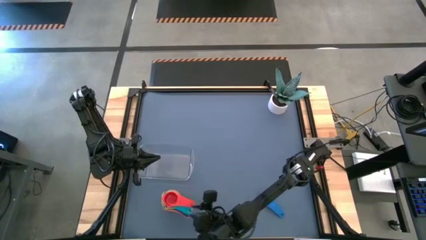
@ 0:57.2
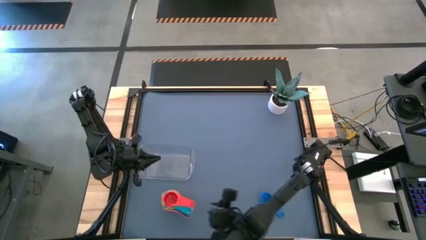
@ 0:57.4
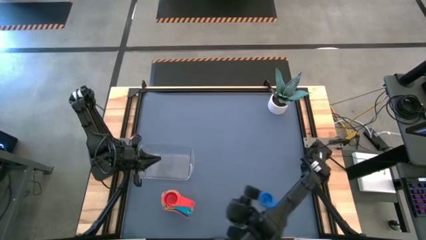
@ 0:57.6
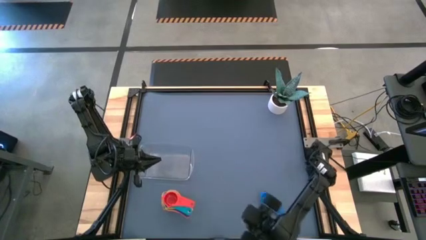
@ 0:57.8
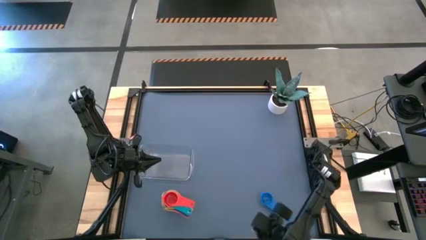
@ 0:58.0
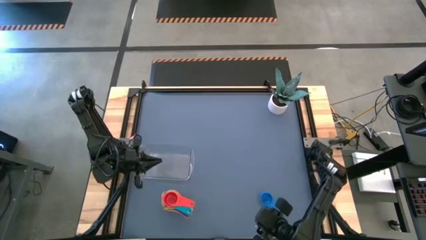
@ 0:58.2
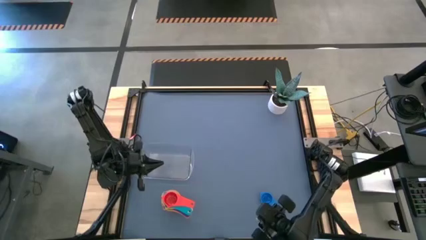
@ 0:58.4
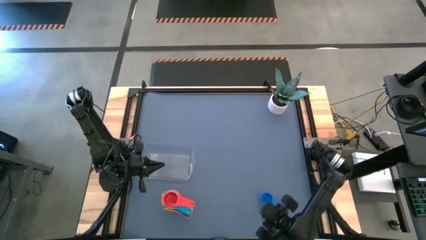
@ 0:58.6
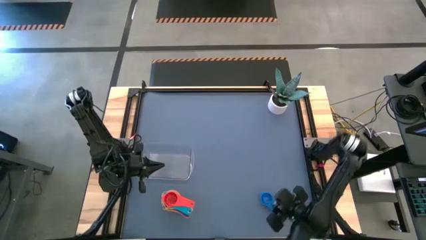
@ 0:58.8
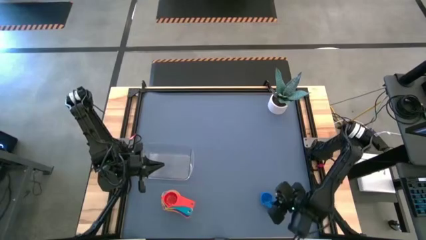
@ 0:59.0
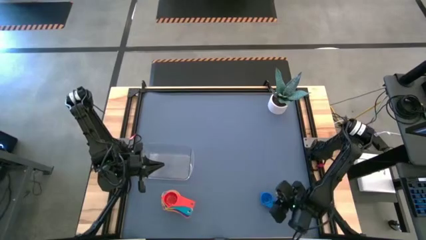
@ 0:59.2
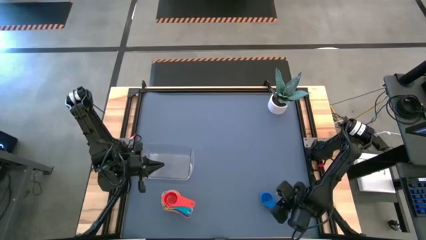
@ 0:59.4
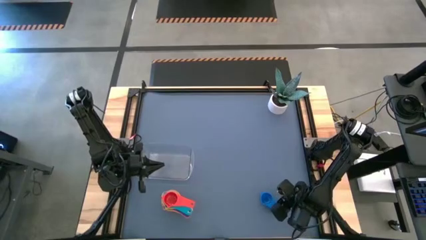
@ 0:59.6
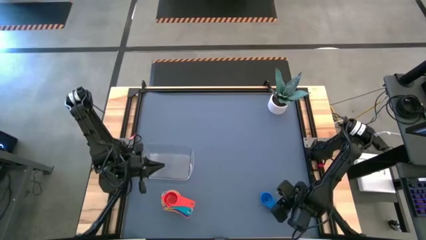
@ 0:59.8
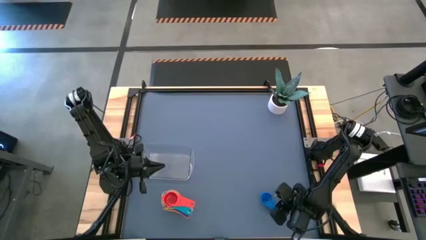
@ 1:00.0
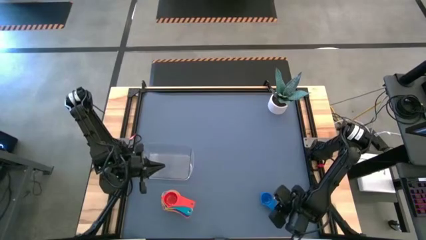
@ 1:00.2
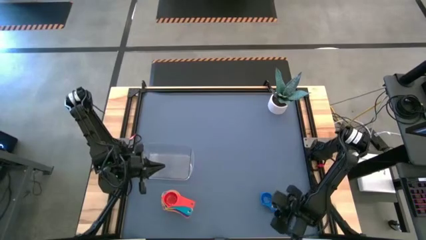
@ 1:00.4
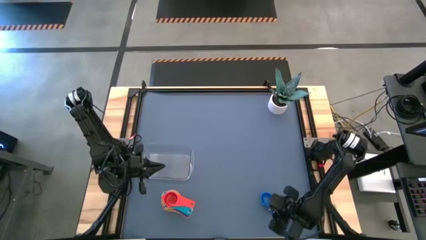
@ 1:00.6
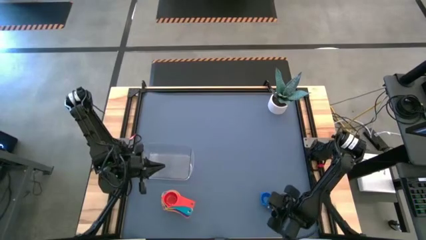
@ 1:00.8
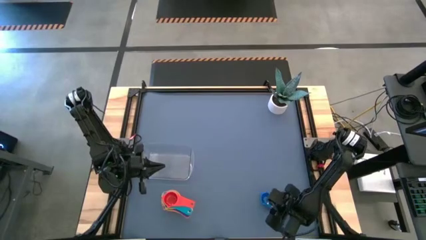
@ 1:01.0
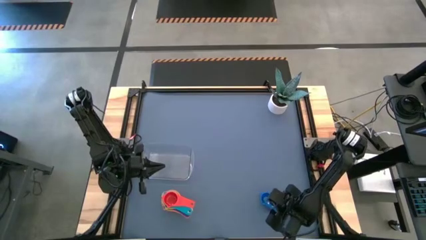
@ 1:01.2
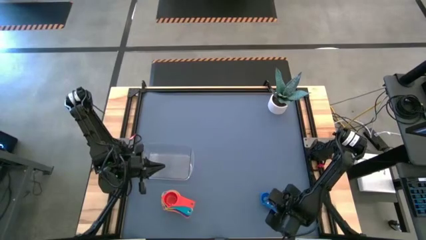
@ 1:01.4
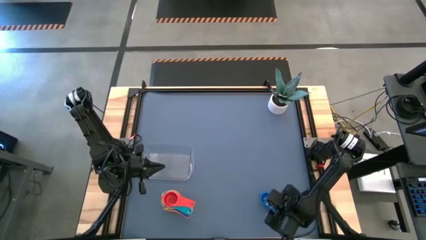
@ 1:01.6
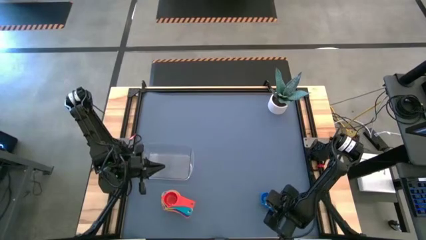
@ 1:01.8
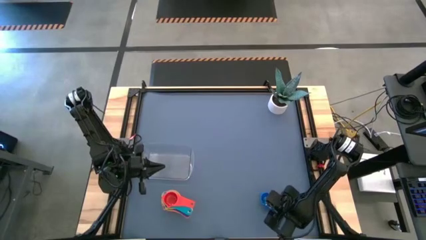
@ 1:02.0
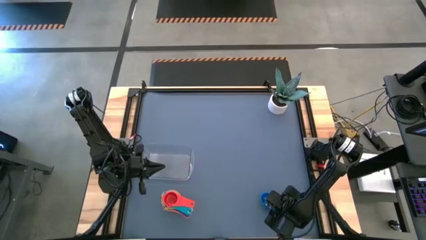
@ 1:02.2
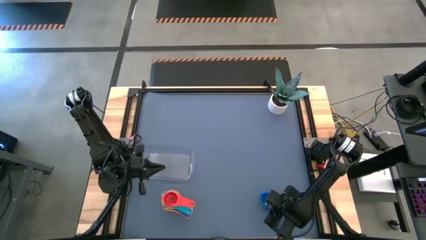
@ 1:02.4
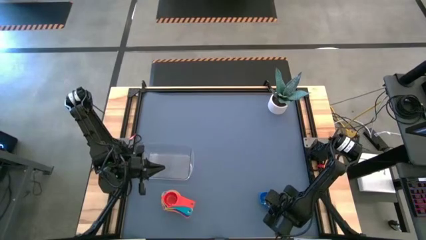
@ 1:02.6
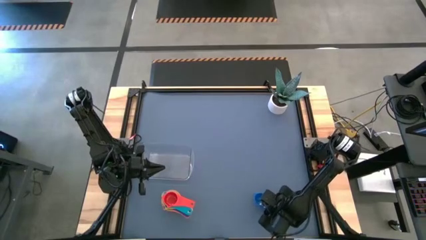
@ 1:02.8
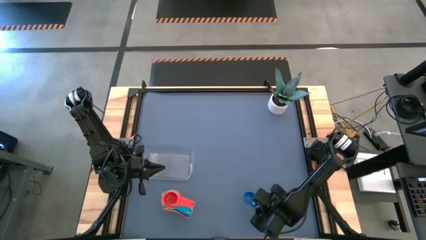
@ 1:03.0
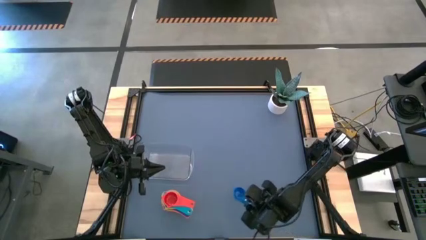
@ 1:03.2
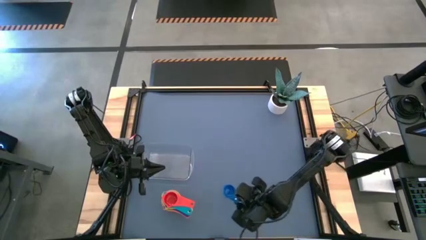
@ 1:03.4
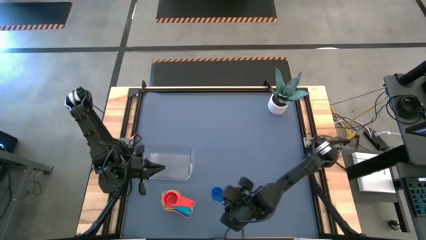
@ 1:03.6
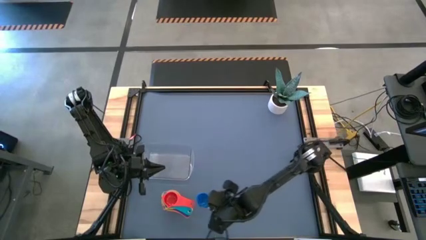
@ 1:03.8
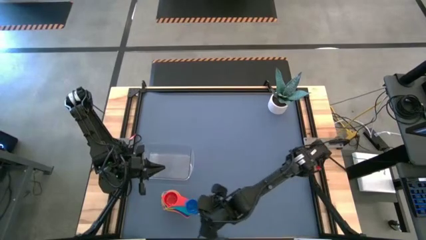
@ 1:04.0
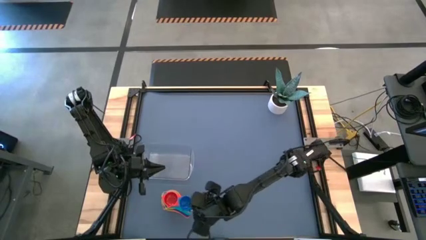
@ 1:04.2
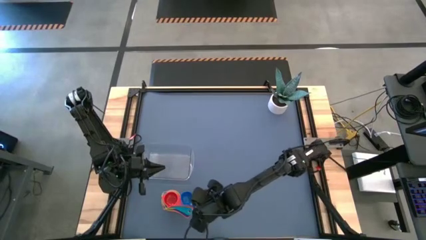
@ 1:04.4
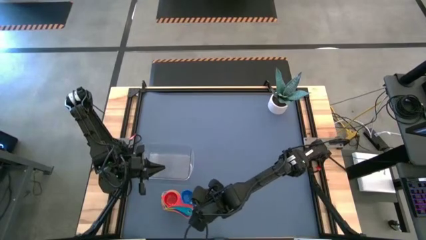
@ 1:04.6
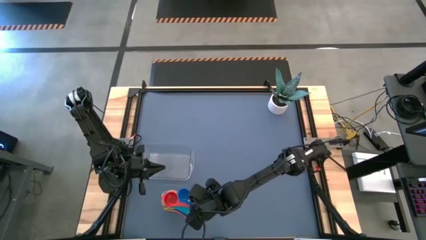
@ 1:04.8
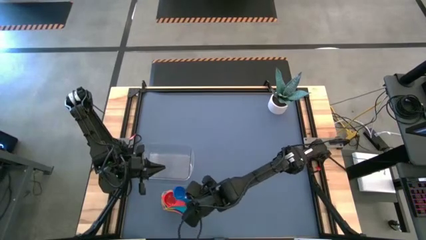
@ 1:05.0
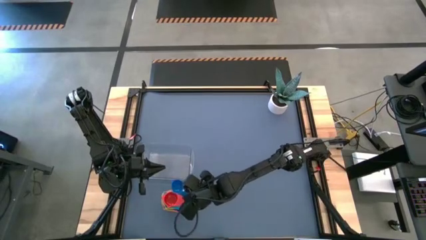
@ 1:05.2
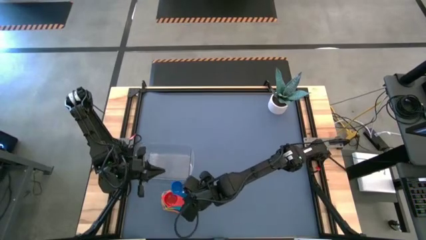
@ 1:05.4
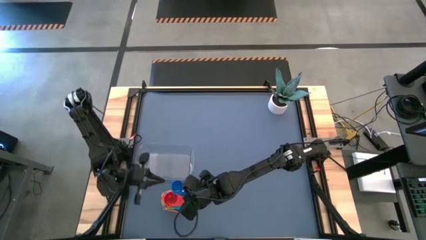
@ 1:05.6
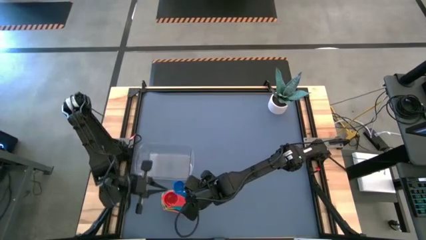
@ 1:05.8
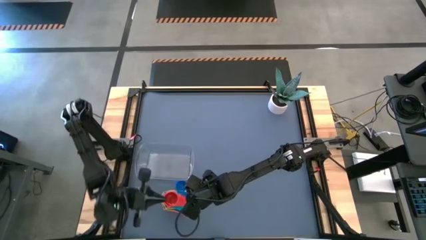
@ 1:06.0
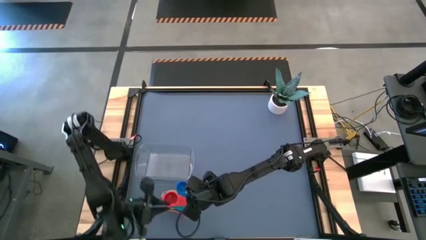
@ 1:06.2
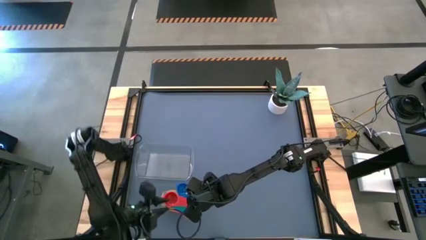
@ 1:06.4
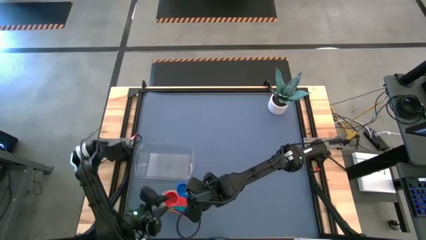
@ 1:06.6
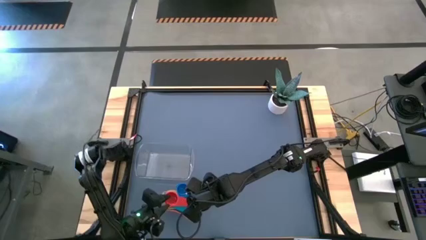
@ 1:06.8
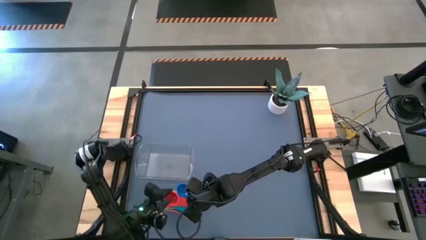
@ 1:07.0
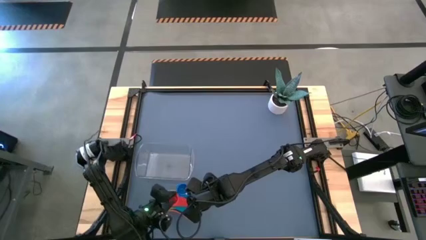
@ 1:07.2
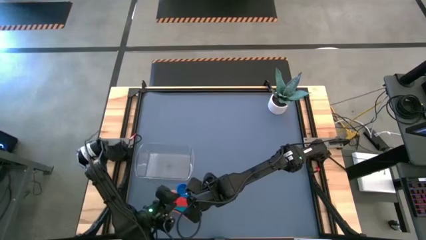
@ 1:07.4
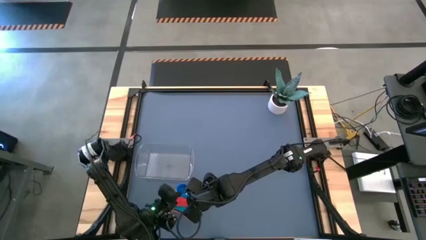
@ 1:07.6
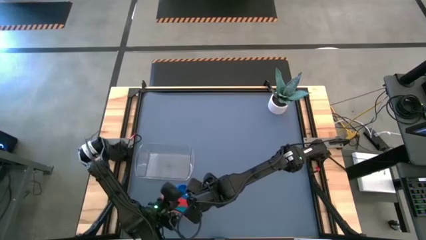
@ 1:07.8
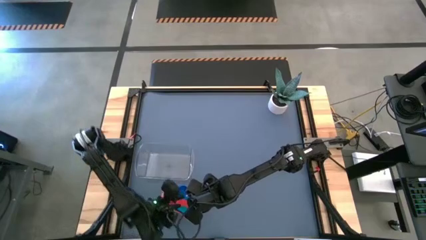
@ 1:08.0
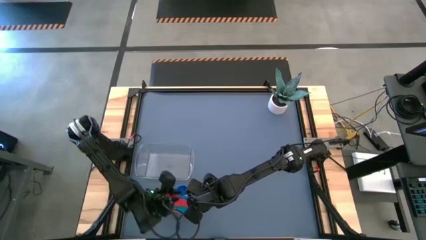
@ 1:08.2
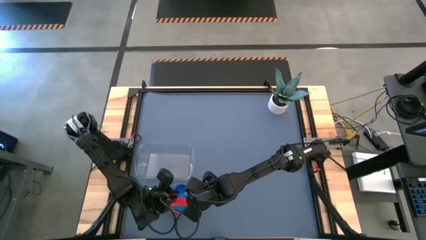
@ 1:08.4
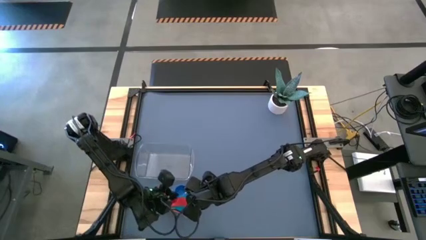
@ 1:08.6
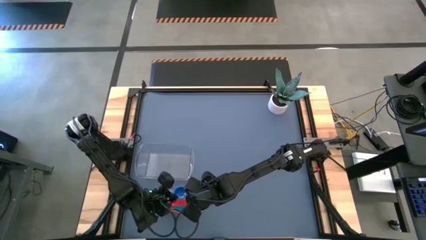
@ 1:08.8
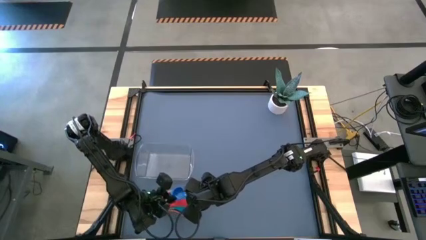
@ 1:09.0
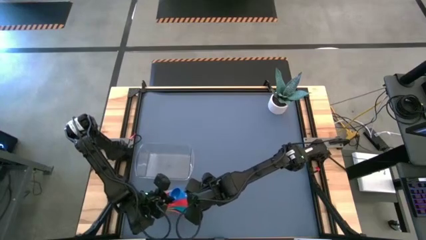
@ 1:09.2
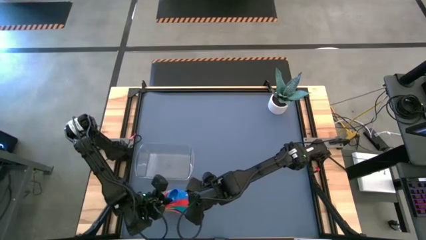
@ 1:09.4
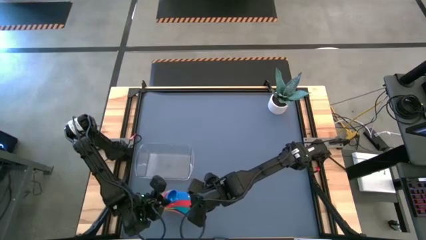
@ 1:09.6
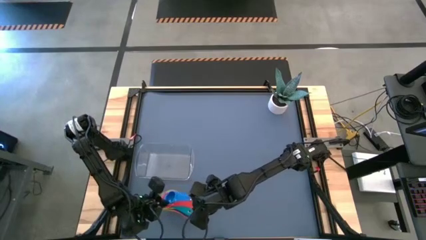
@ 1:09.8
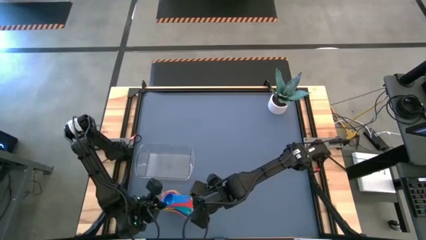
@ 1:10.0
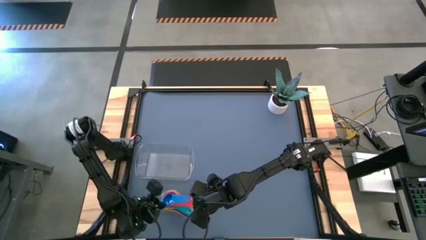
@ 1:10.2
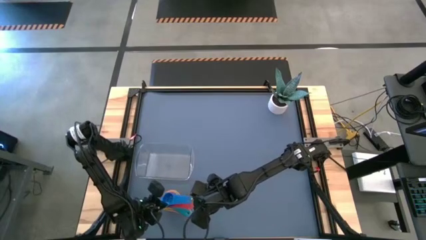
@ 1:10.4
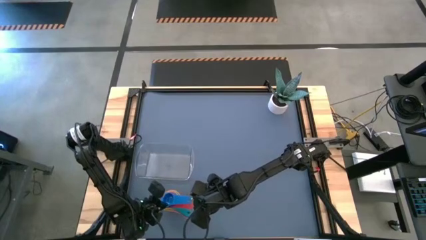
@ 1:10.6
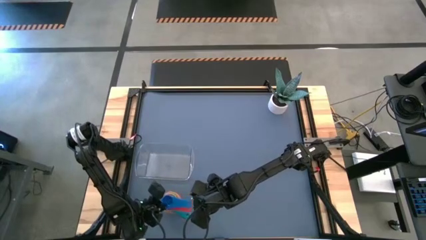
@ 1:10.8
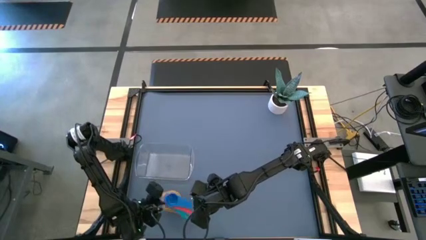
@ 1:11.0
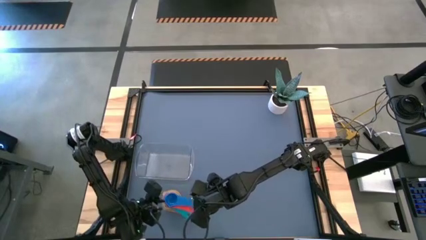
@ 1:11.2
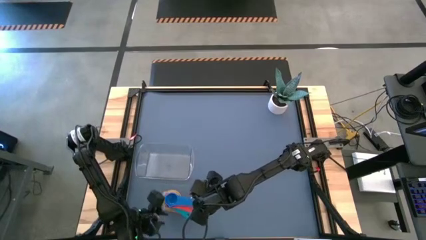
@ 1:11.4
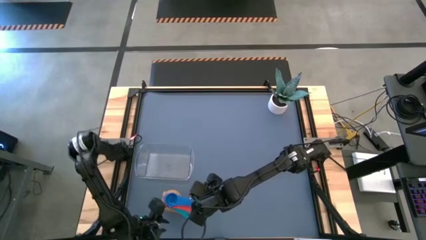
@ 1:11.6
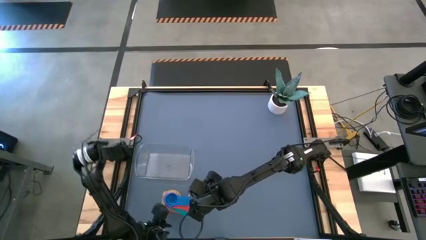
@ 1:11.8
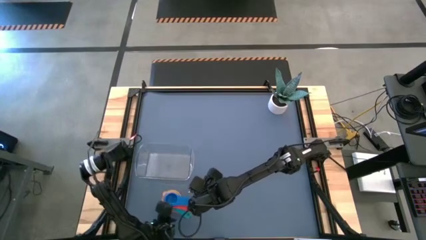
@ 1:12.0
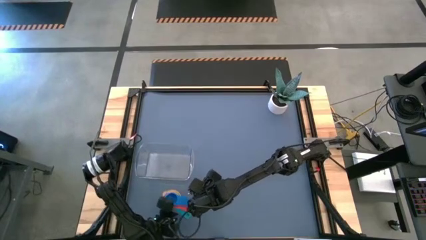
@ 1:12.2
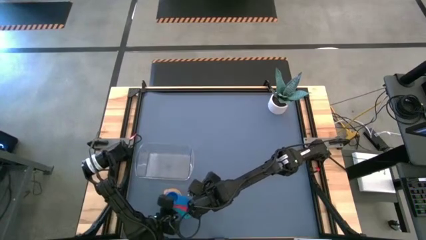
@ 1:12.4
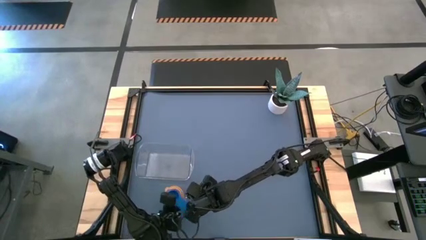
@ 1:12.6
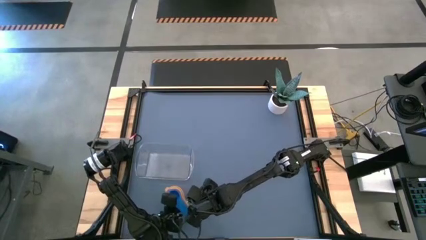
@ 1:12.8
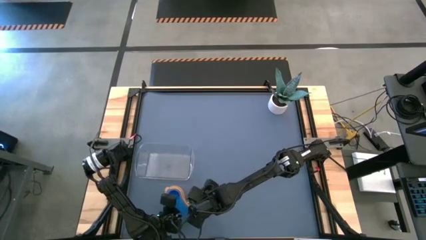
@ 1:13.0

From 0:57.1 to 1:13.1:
Task: Nest measuring cups in basket
Stack the blue measuring cup on top of the orange measuring cup

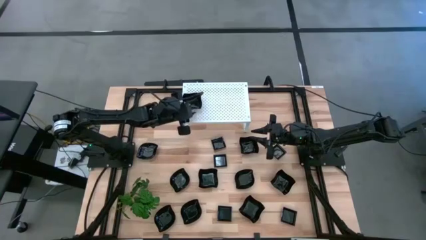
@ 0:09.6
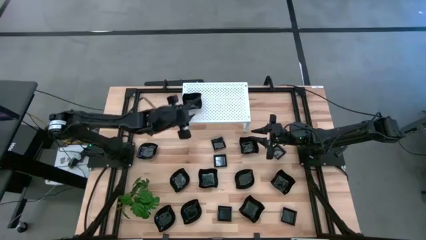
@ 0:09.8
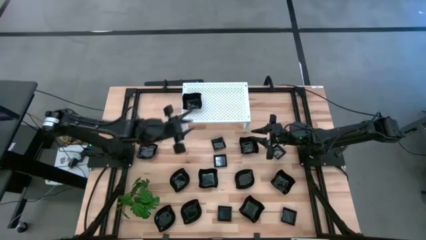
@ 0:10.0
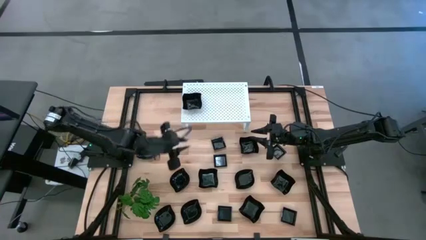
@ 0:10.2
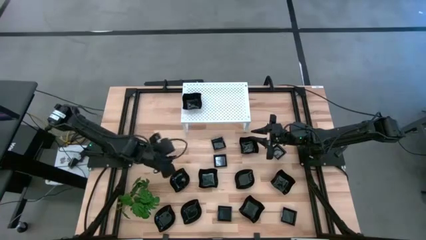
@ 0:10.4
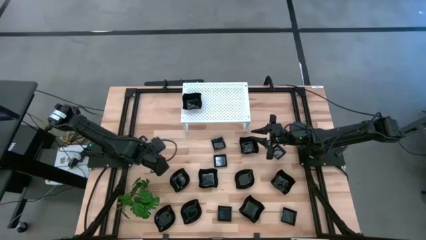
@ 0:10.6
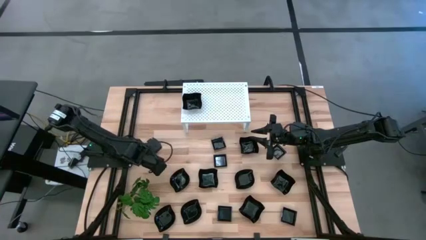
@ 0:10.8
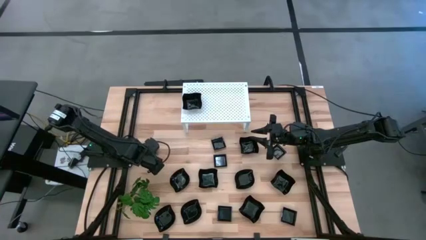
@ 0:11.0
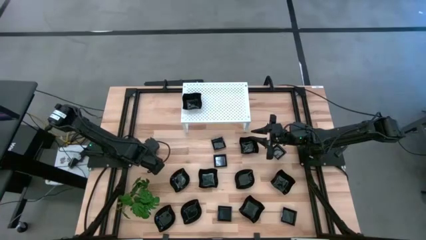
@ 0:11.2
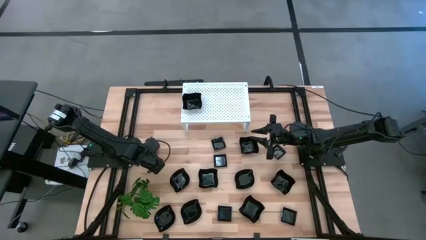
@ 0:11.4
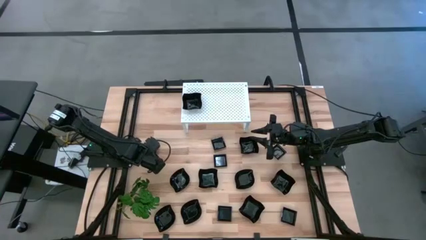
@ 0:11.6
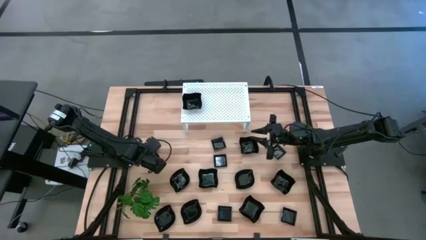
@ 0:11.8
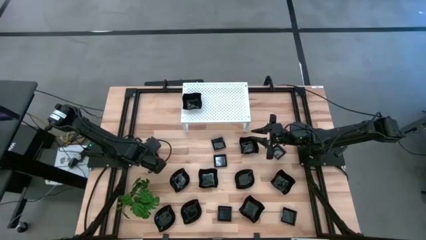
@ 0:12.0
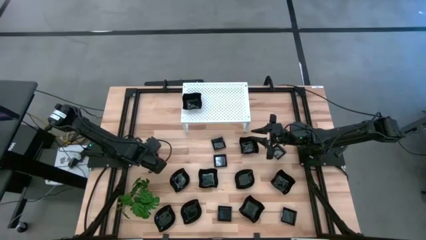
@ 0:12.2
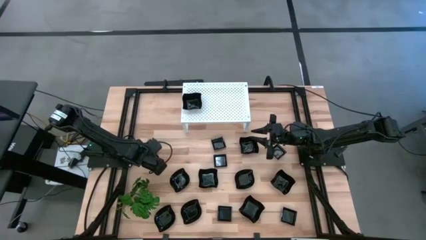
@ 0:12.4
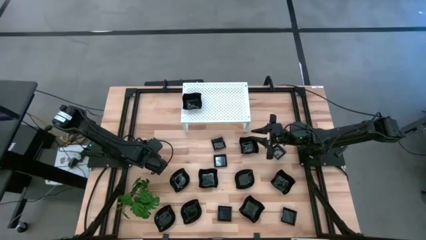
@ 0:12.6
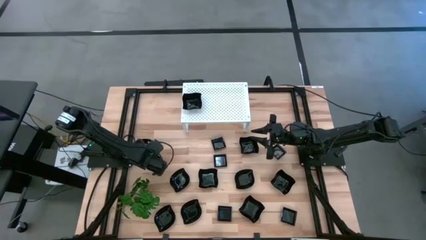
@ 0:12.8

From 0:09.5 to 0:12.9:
Task: Pick & Place Mini shaped plates
Put the leaf shaped plate on the shelf
